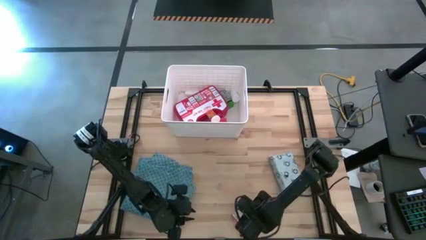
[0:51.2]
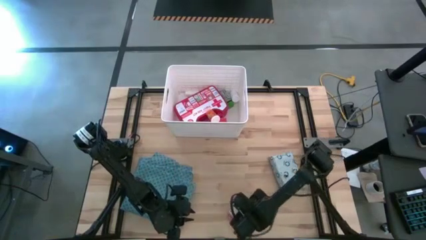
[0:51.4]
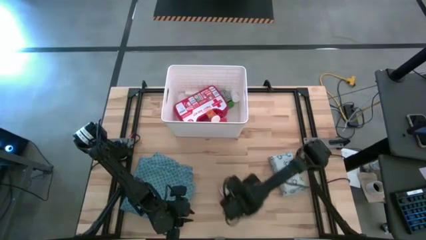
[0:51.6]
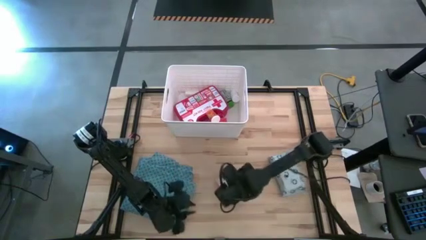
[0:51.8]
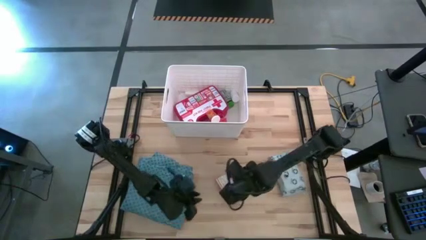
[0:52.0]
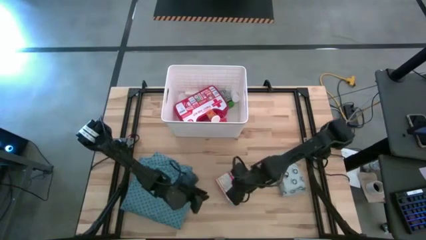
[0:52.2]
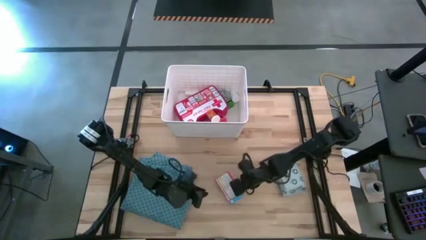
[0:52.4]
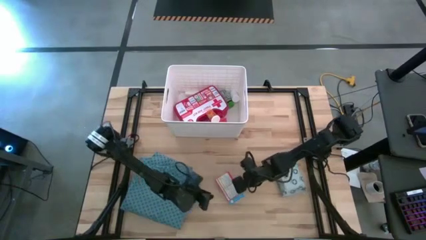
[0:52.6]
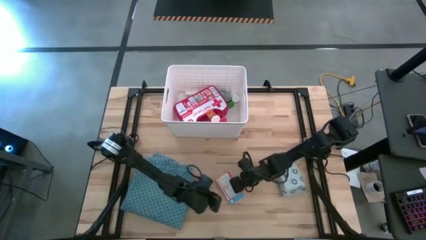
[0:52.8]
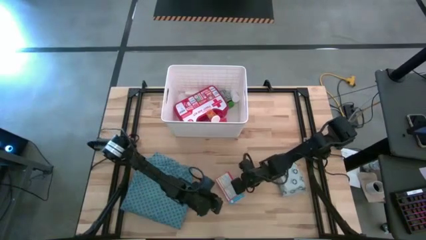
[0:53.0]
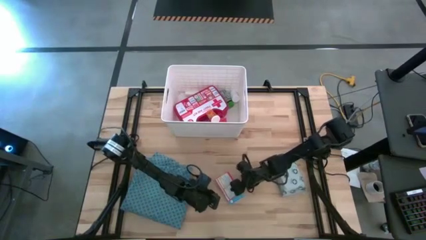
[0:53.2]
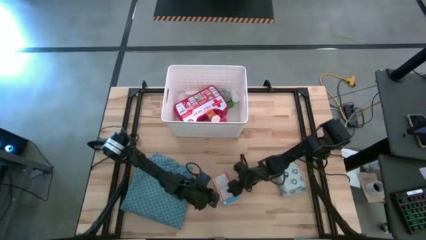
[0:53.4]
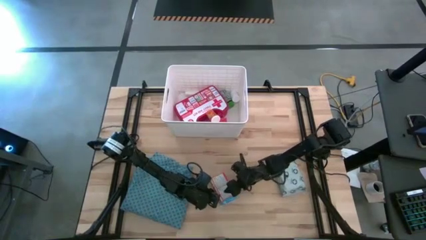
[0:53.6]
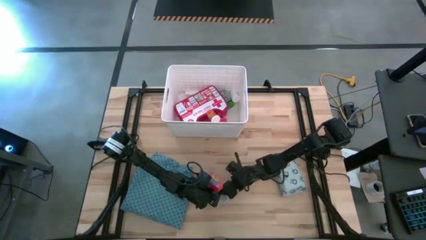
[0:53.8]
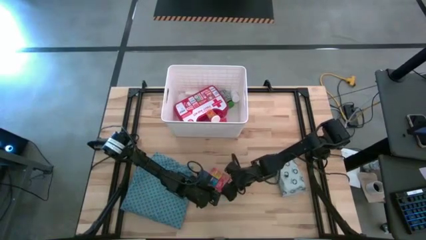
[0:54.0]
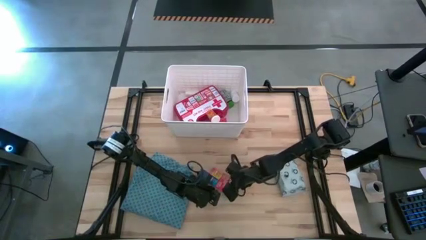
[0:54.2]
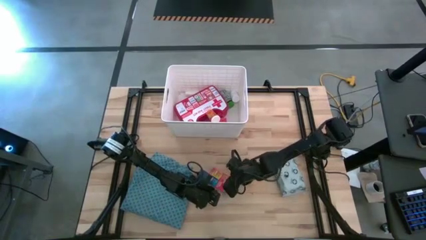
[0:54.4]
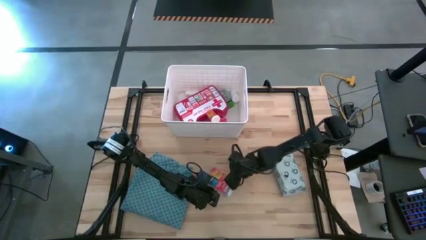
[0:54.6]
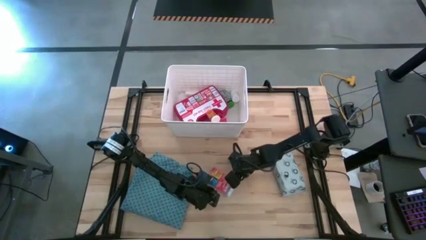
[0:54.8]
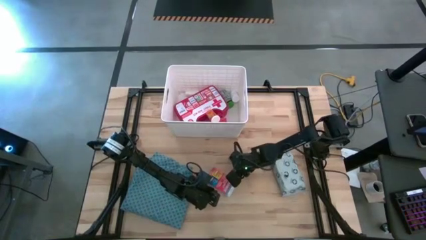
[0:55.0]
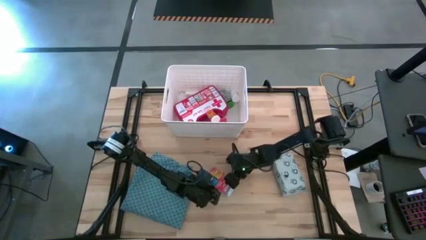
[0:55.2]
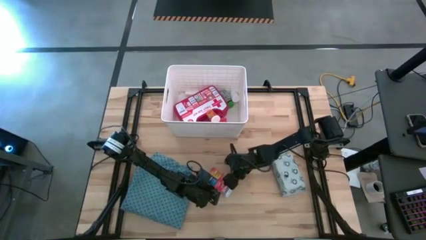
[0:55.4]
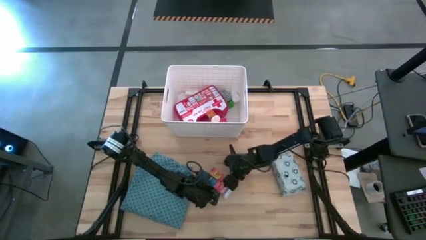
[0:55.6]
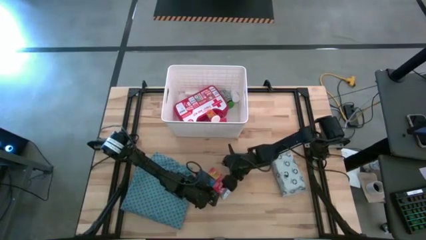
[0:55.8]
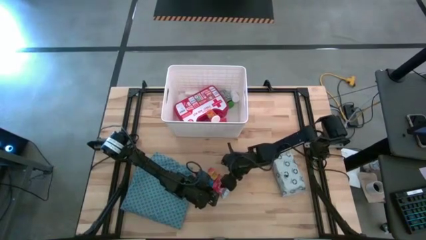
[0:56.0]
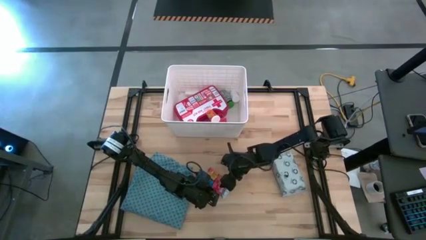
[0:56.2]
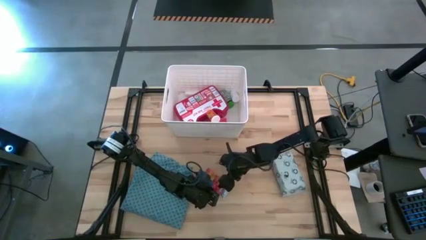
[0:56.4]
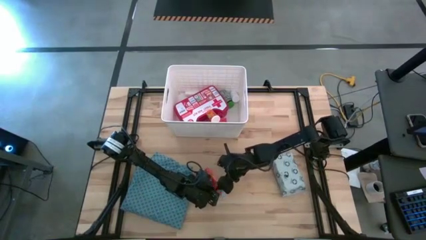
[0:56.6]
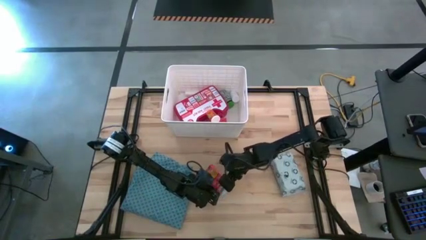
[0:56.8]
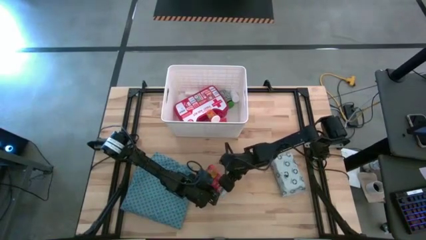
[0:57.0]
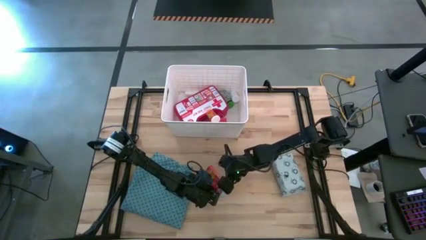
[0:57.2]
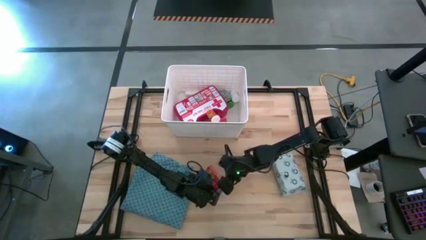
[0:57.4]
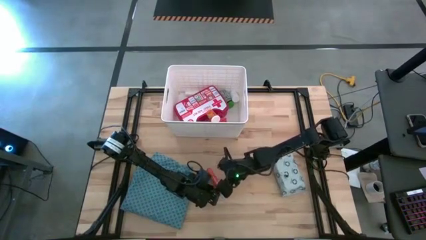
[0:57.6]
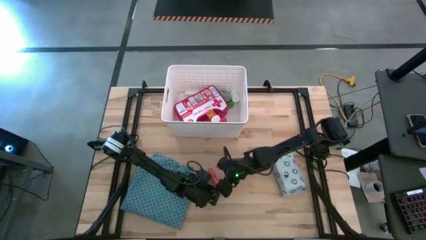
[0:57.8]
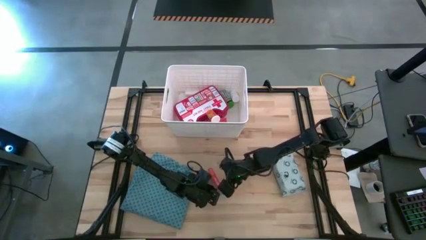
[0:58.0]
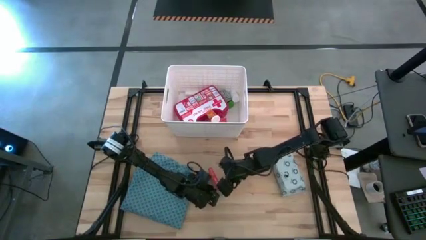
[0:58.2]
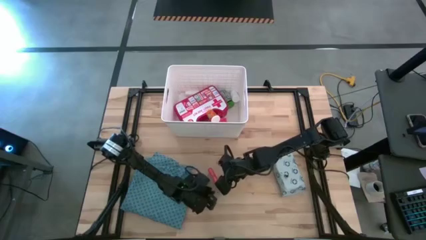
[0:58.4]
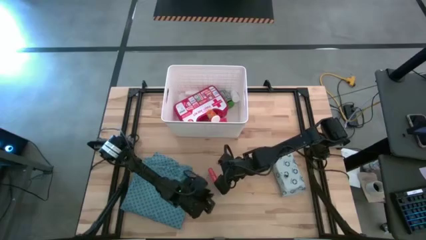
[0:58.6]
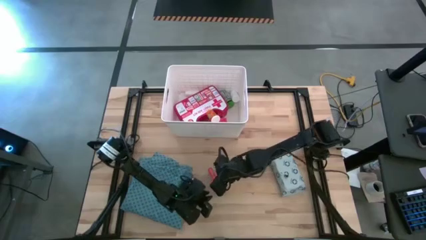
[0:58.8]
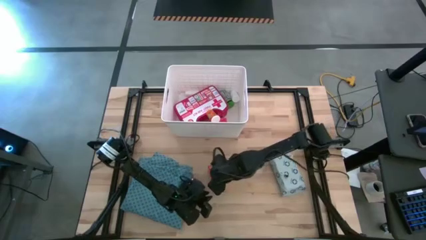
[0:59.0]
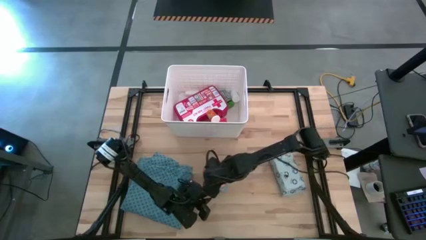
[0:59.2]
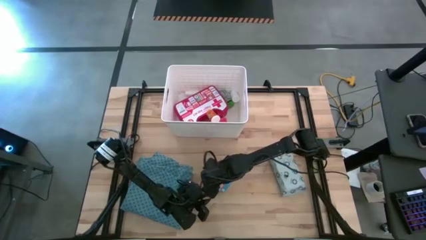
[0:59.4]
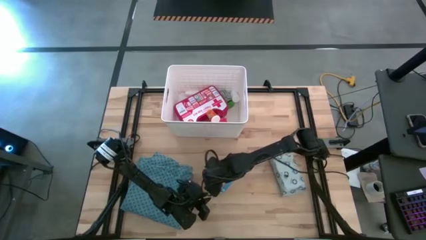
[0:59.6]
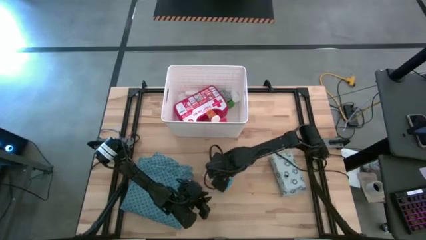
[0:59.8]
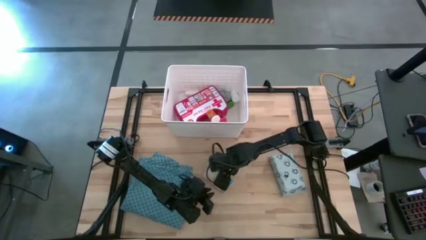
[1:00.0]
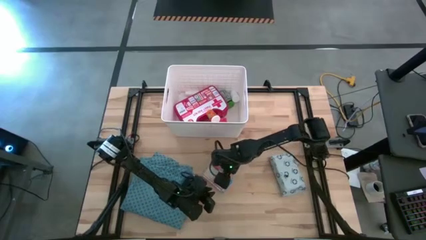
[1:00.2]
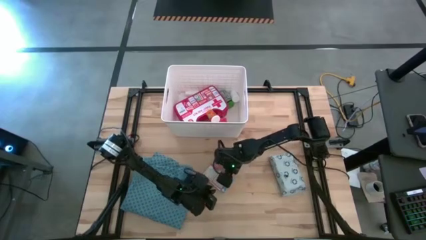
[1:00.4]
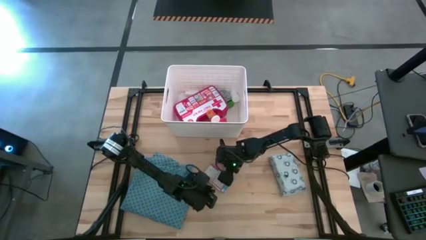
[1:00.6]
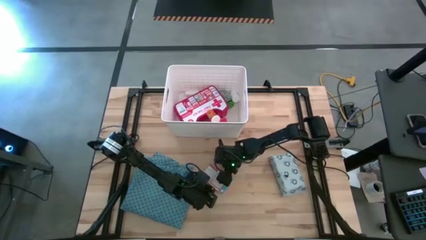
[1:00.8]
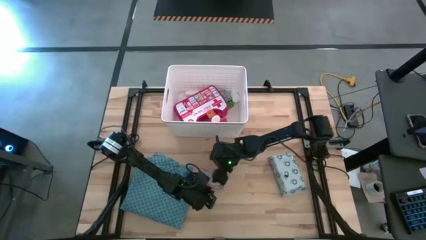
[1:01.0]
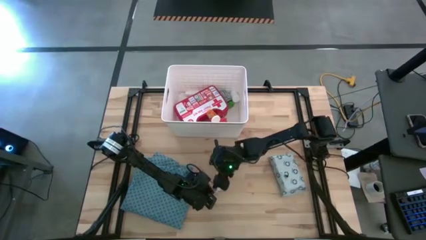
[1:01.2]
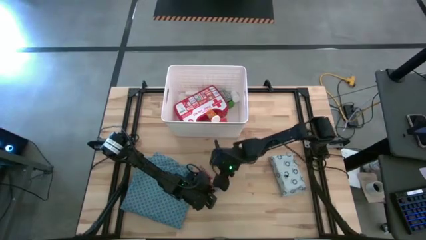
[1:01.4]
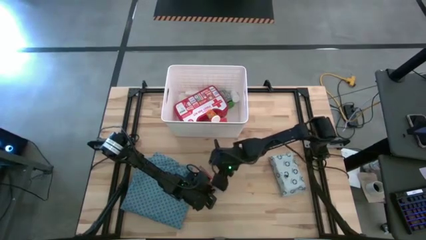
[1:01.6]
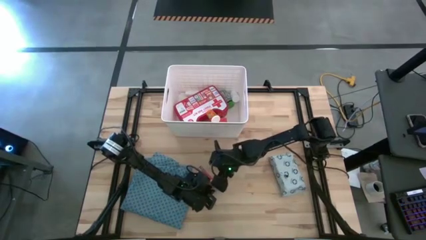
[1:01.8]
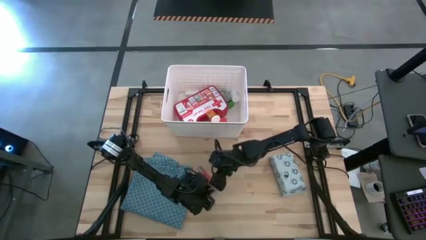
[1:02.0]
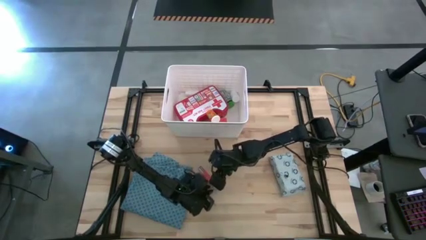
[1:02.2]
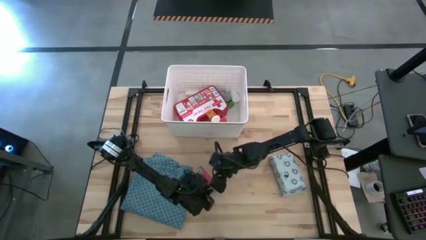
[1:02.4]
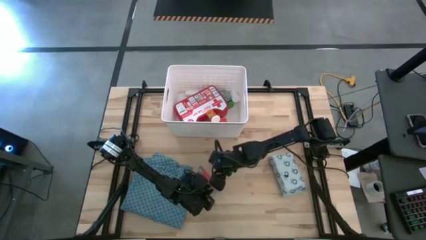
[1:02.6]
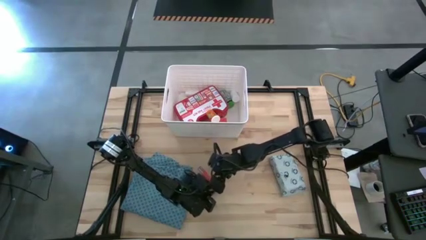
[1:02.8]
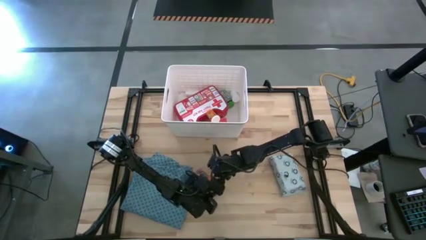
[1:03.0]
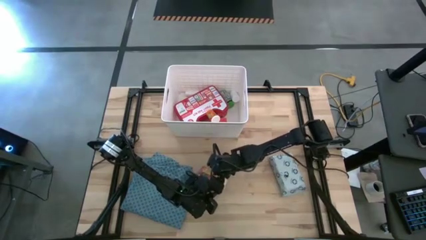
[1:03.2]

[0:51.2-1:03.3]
Task: Pick & place medical supplies in basket/bin
Put the red medicine box into the white bin

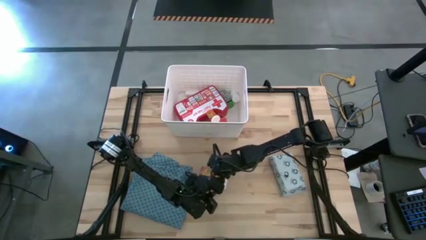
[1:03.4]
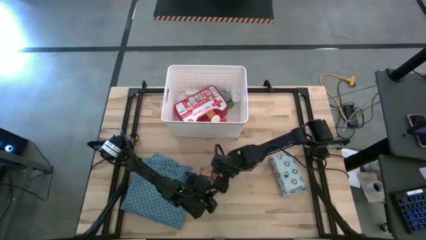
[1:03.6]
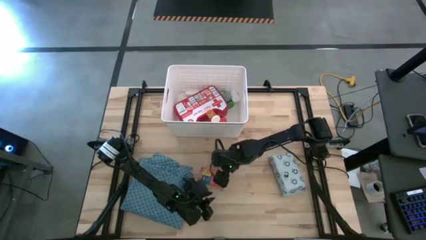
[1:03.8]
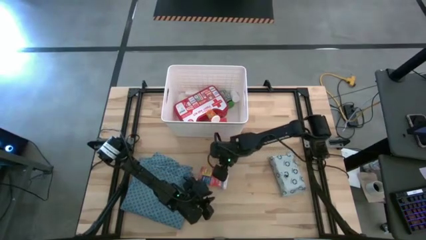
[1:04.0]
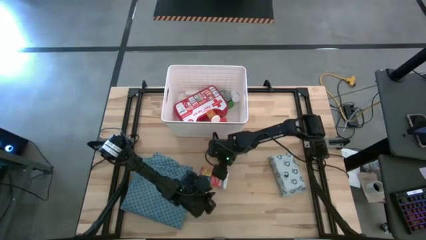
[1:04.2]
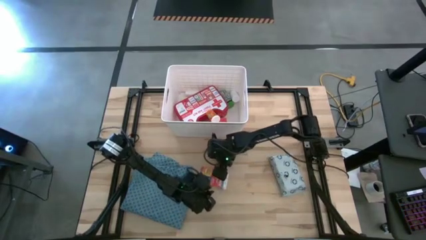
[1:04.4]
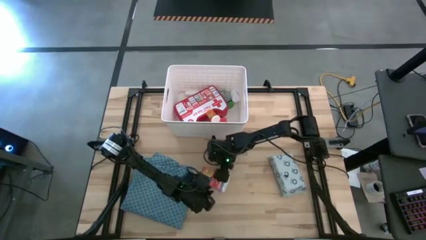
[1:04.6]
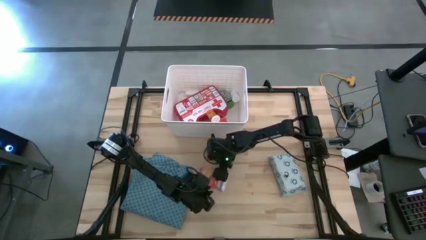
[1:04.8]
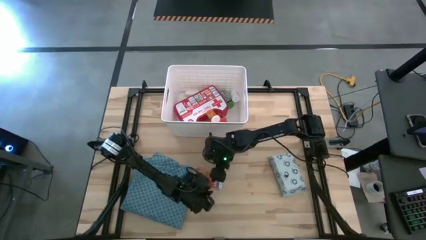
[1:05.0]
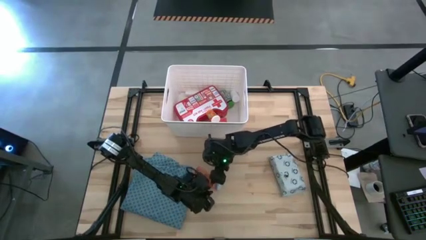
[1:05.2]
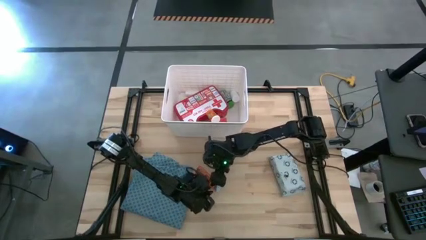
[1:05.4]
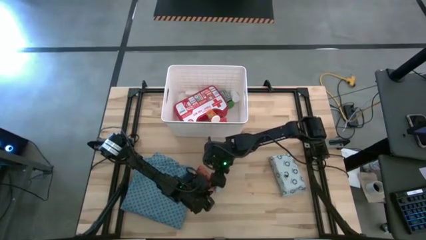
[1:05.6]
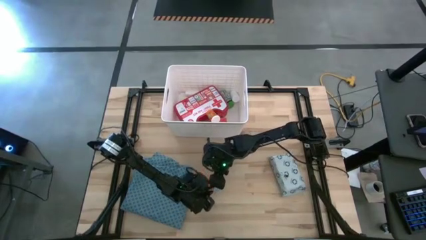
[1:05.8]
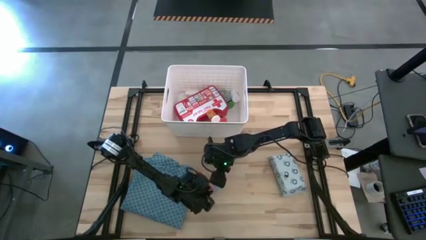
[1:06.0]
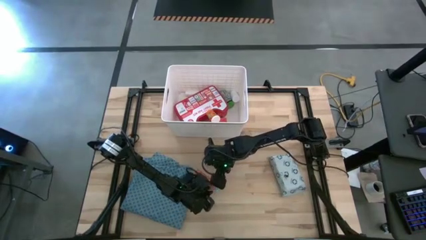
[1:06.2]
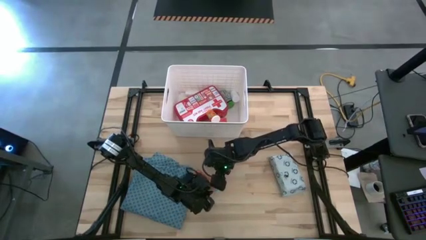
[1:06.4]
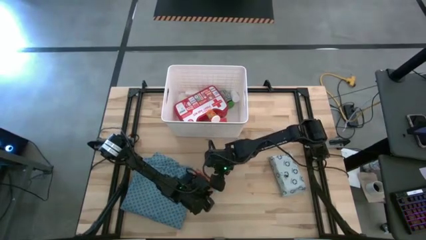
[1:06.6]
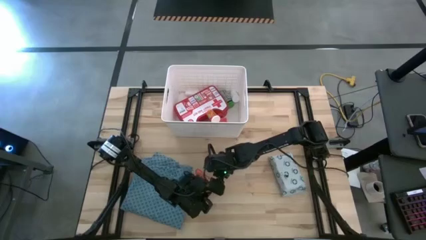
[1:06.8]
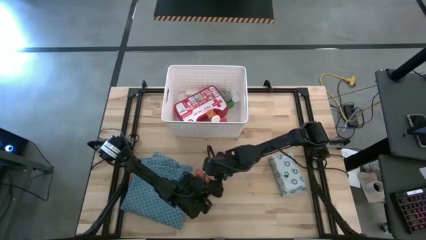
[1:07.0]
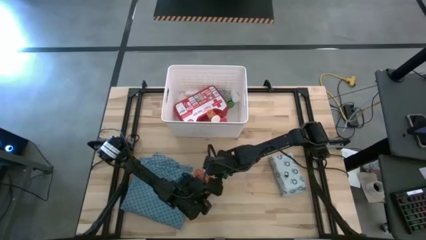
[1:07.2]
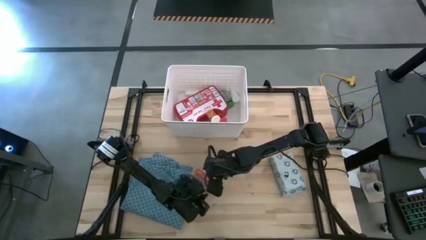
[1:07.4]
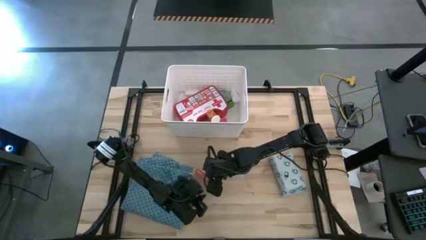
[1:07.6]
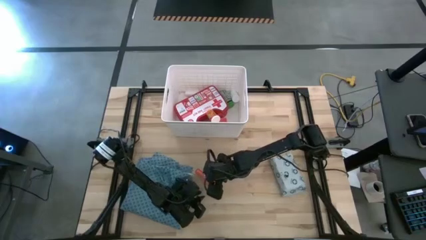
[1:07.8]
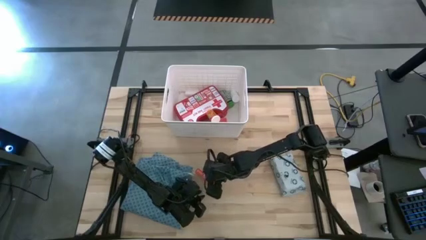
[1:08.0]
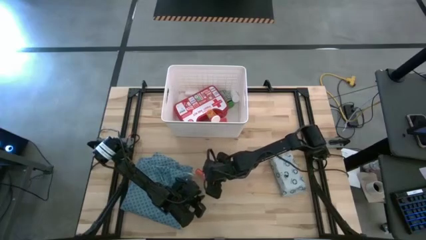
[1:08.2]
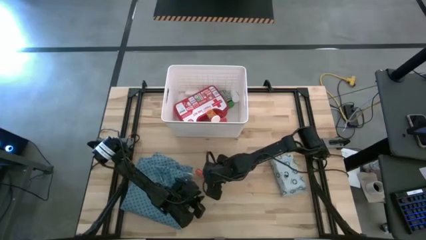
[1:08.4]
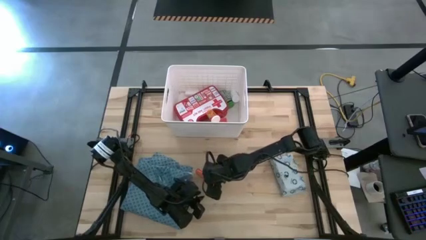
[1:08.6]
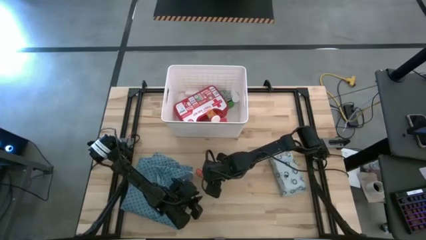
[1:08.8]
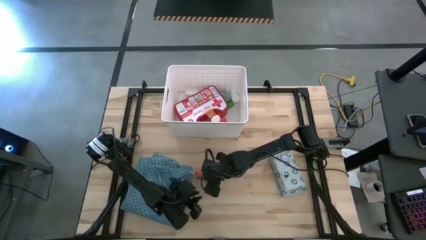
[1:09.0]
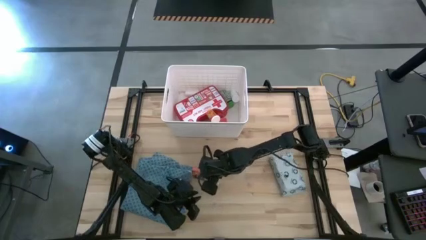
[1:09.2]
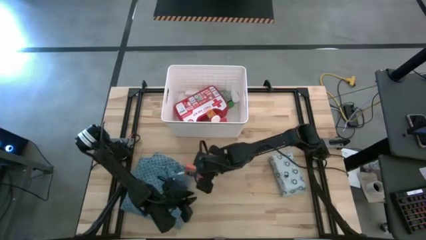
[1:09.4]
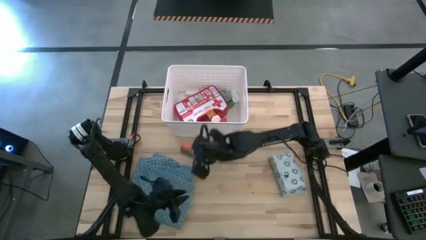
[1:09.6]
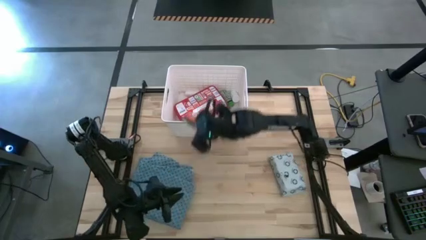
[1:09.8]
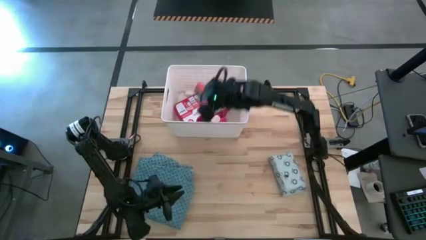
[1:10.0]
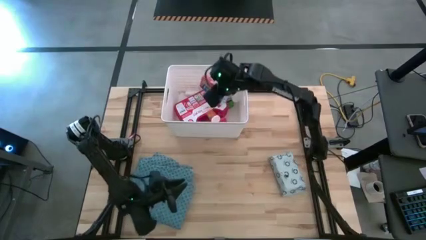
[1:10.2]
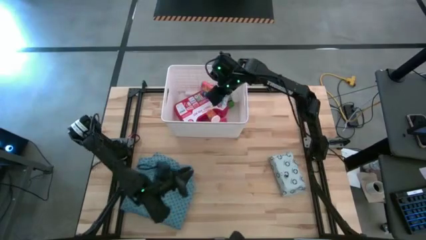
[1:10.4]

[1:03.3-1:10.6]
Put the red medicine box into the white bin
